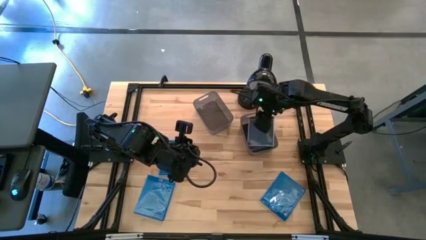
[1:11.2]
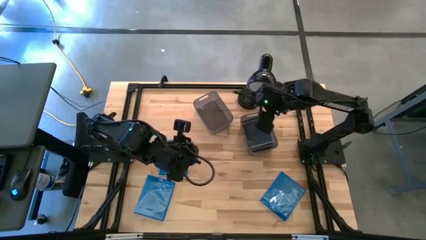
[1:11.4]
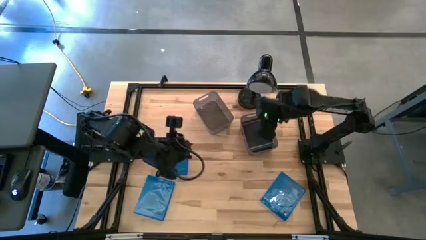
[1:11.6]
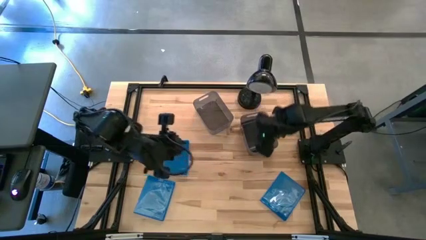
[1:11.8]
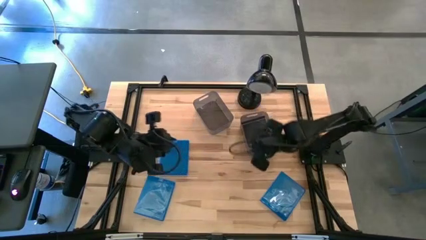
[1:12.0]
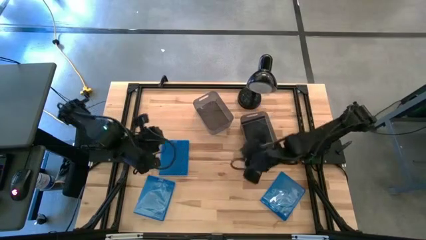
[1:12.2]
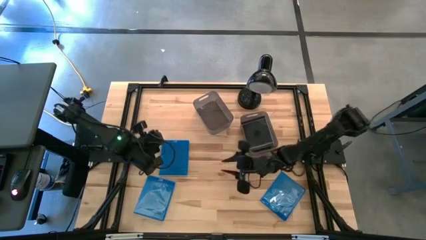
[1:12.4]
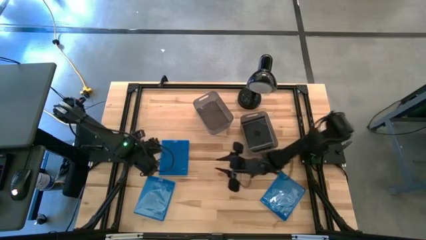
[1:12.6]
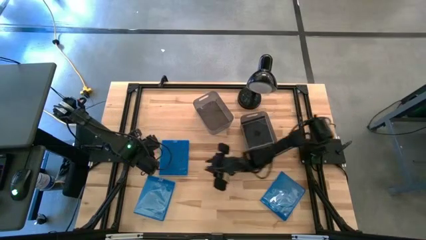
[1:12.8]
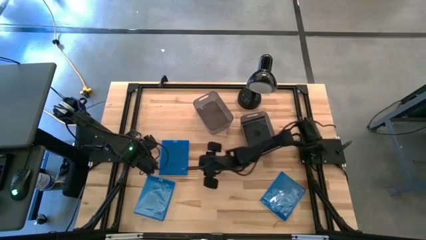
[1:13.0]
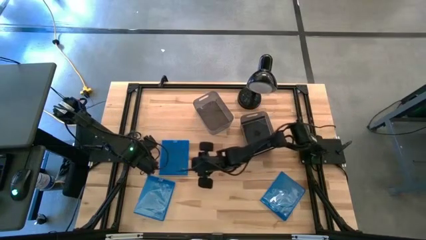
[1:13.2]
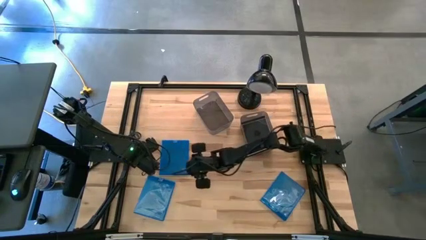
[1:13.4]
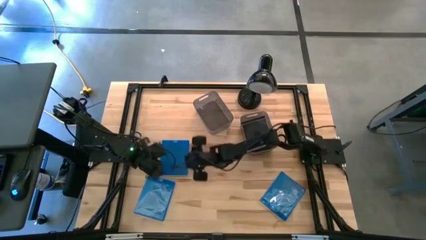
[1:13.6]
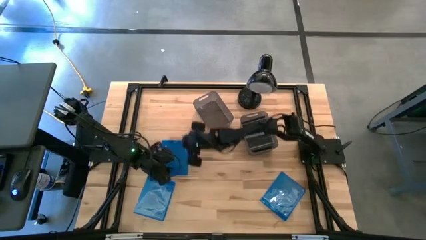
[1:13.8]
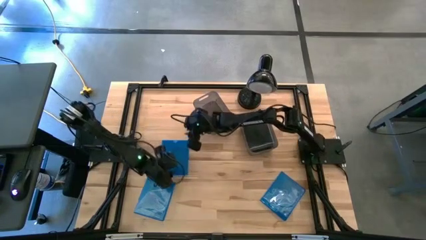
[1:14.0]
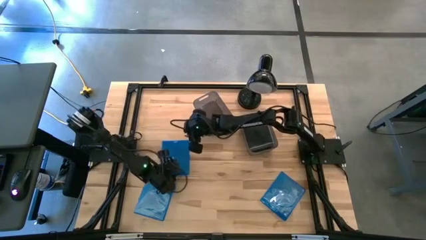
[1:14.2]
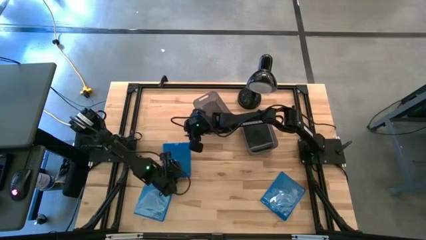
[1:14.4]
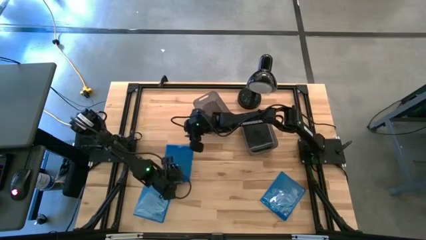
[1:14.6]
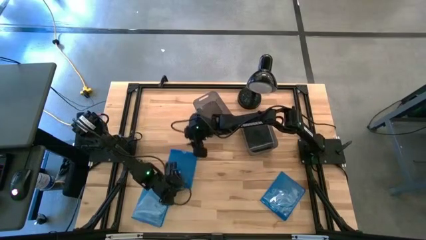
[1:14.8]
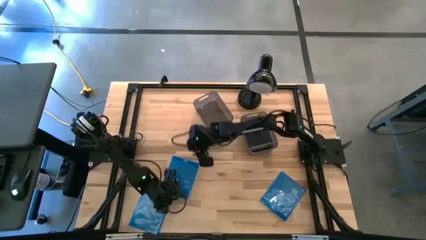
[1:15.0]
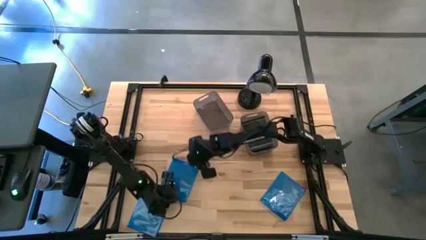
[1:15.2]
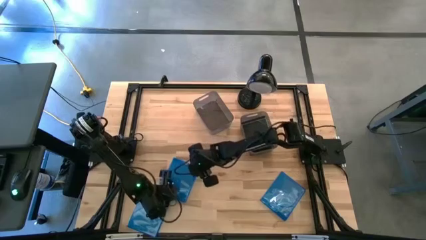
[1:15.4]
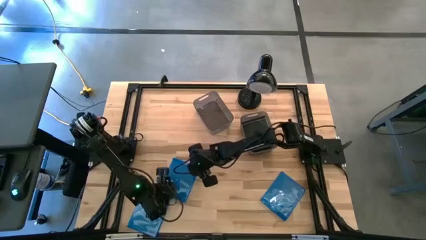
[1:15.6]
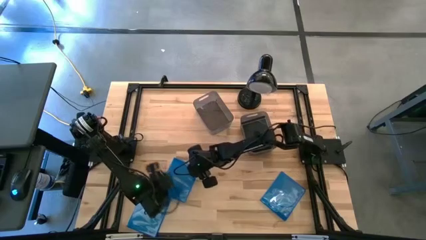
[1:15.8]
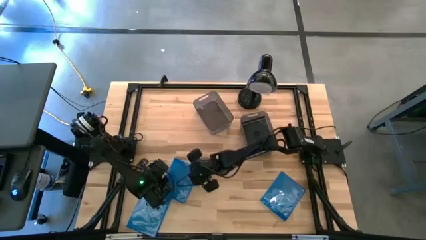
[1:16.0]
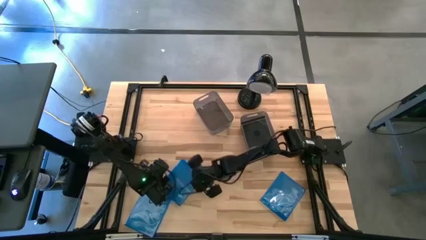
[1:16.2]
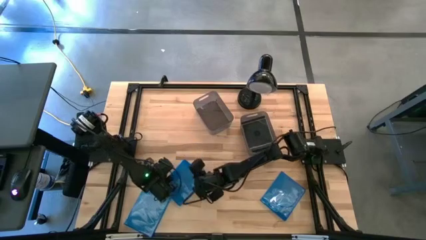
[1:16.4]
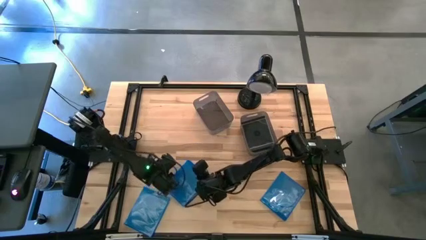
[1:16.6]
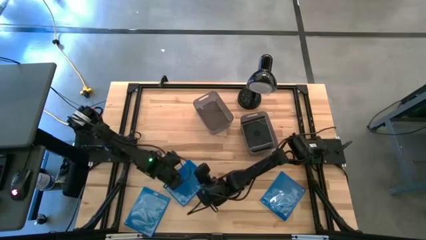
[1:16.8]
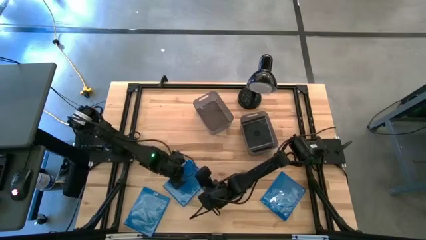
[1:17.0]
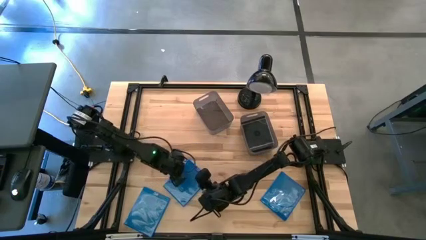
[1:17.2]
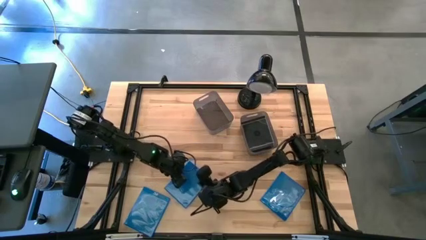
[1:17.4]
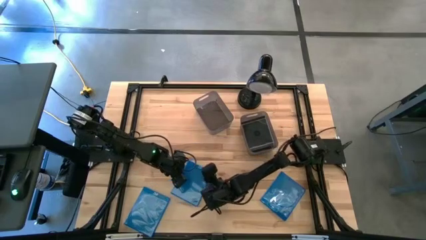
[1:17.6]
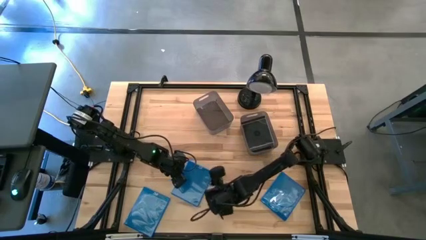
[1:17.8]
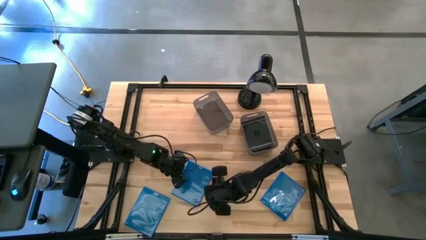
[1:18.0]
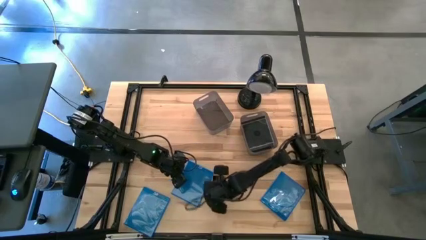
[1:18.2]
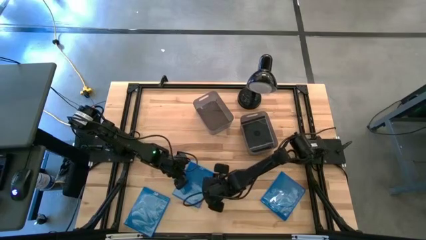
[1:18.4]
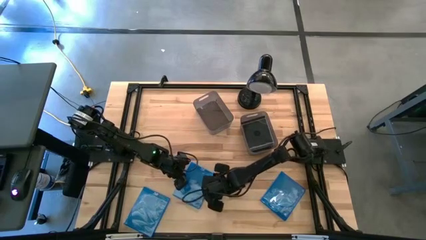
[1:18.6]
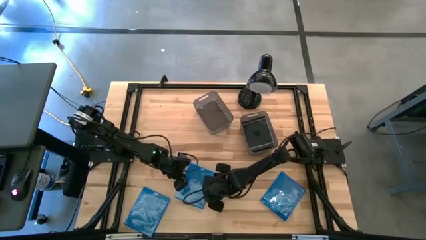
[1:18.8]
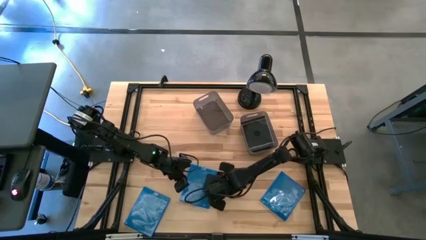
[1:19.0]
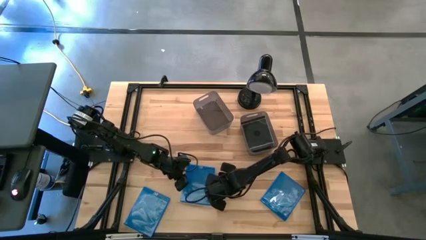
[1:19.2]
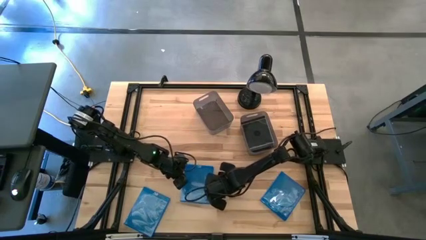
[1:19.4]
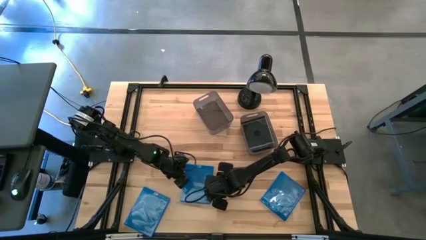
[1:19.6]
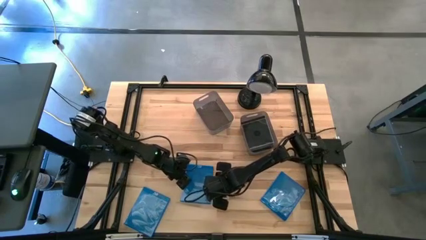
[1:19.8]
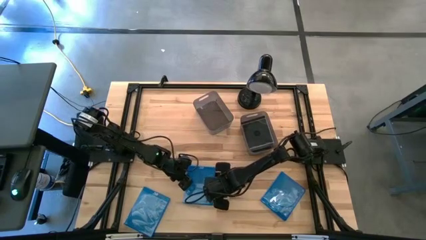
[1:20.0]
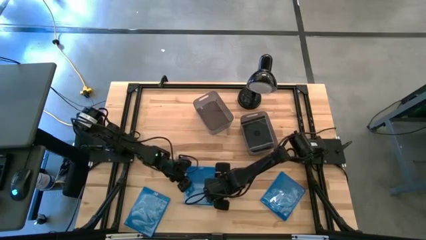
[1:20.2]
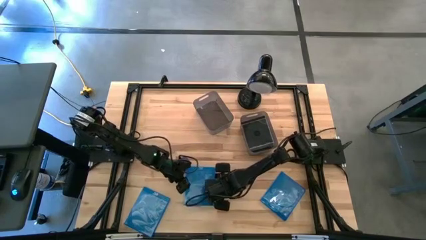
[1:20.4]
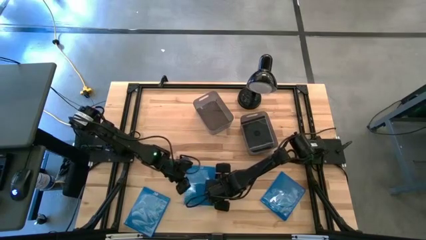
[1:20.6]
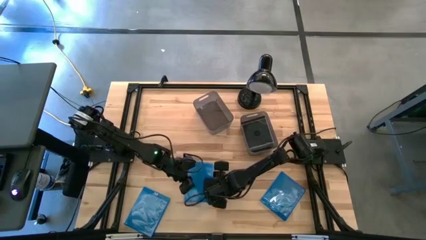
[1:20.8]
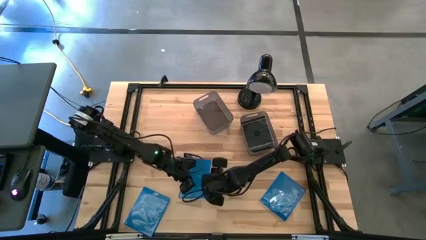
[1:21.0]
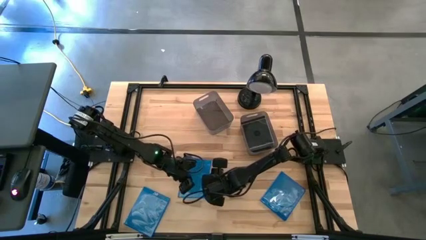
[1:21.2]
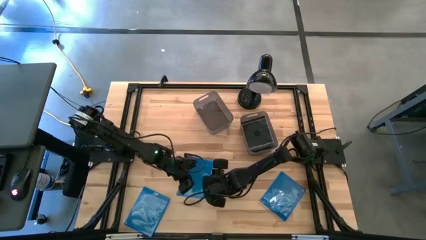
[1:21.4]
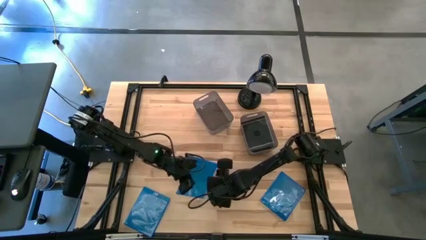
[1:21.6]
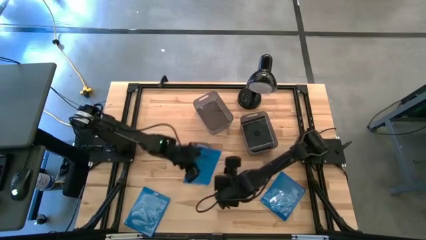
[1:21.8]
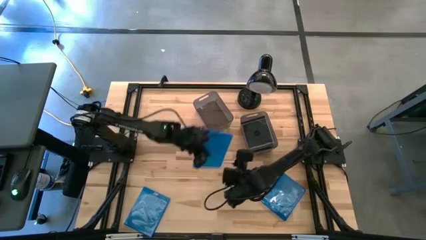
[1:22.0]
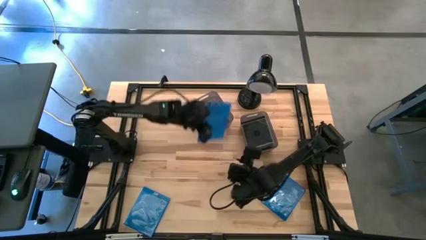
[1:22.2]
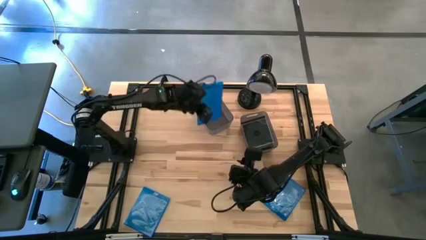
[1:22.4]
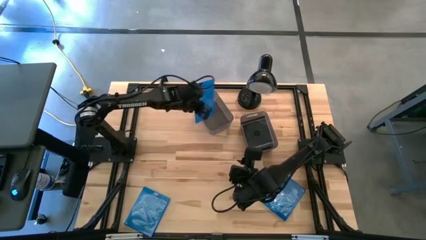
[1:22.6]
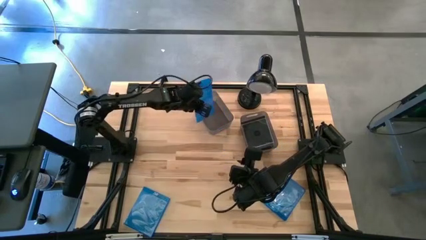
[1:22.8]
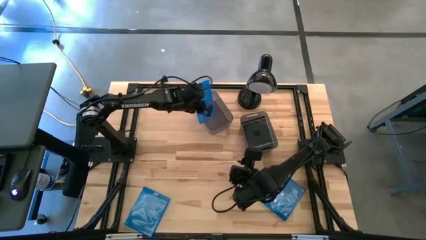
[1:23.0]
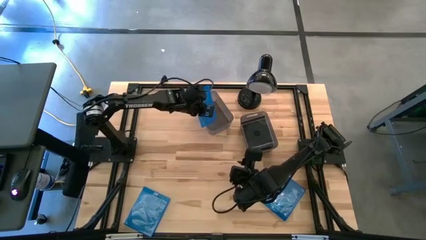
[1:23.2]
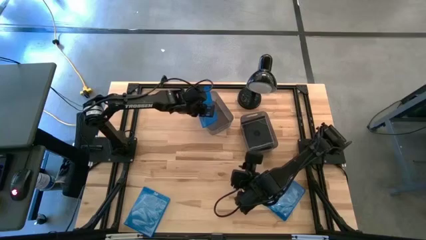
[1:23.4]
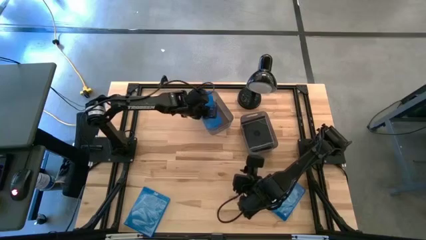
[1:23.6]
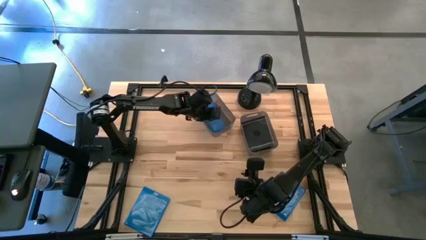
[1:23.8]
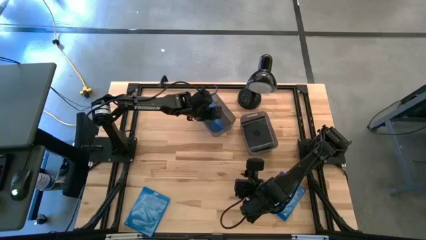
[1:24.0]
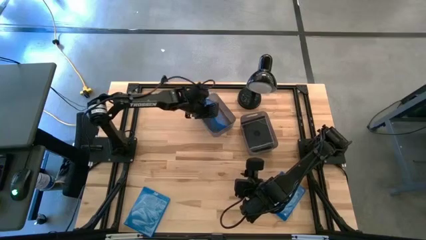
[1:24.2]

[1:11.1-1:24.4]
Task: Pick & place jewel cases by type
Put the top blue CD case into the left black bin

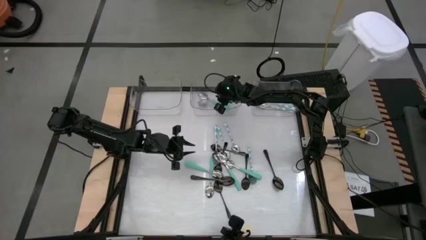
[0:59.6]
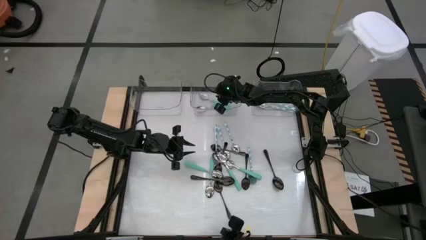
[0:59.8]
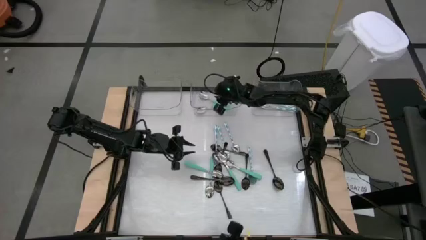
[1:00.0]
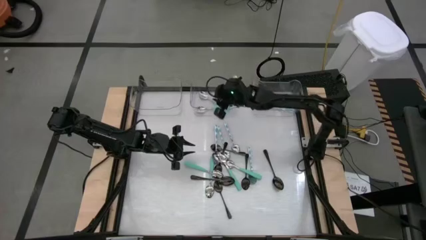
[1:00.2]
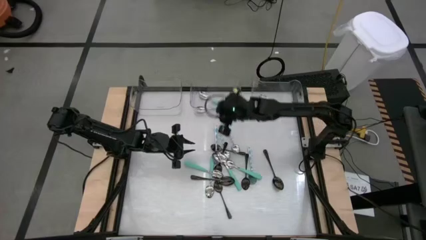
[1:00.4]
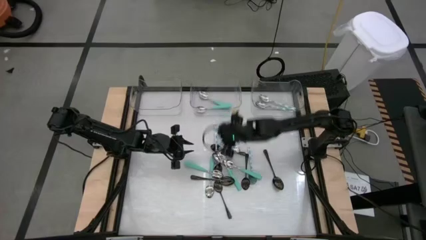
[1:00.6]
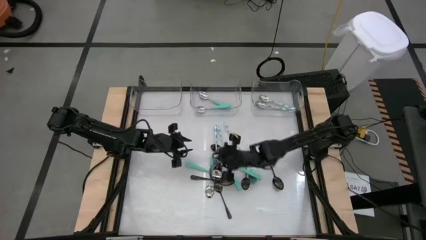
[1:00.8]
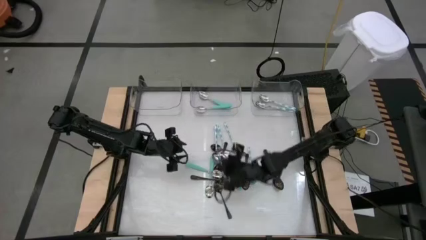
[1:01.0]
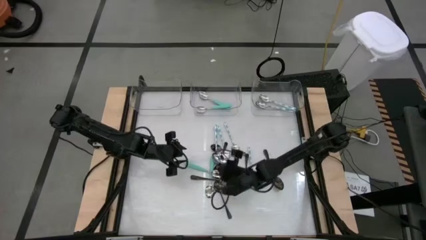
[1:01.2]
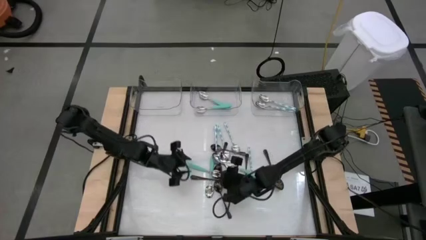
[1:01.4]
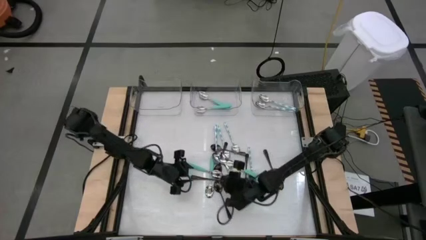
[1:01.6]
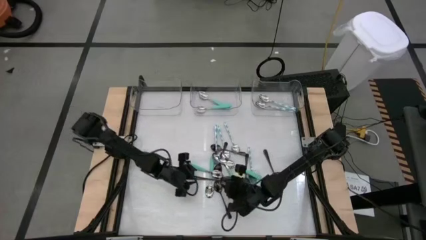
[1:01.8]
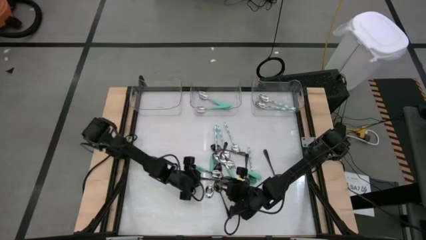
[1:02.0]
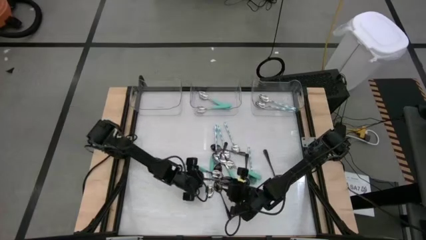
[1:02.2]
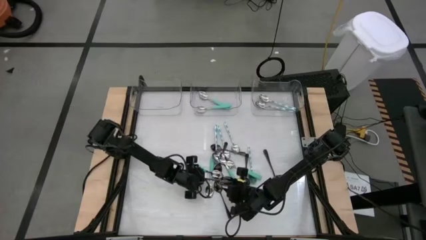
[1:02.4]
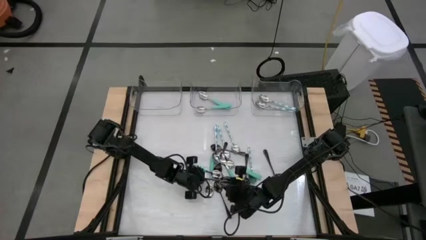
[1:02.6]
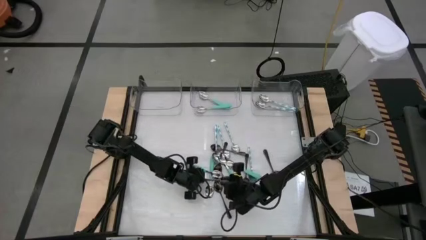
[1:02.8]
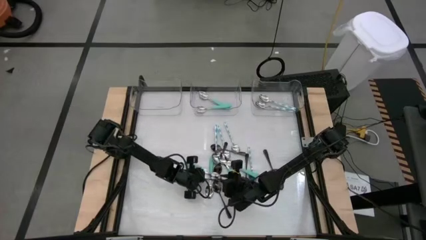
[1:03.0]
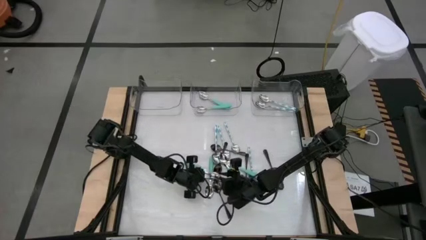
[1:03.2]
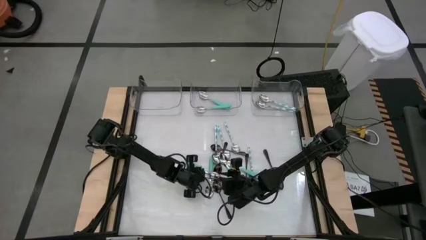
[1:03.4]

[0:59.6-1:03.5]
Task: Sort silverware by color (type)
Put the black spoon into the left transparent bin
